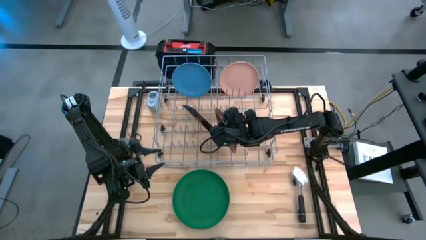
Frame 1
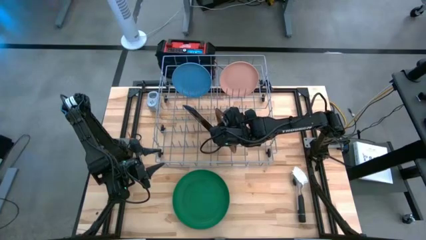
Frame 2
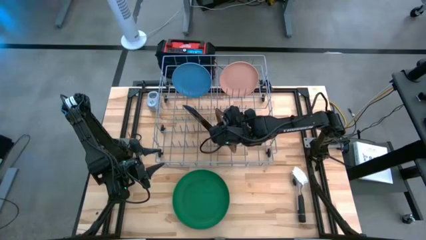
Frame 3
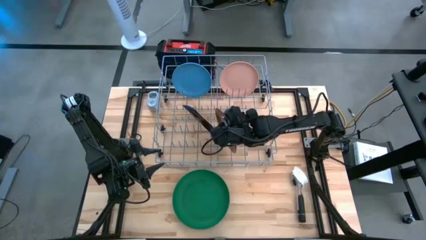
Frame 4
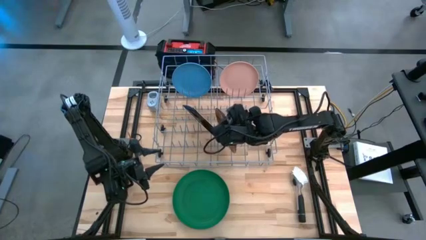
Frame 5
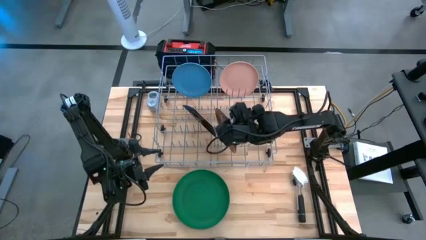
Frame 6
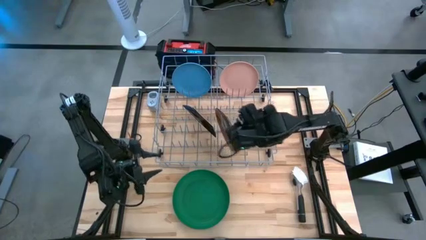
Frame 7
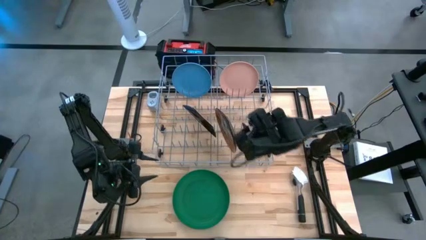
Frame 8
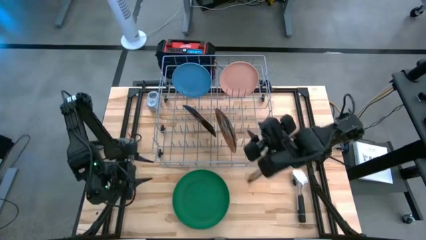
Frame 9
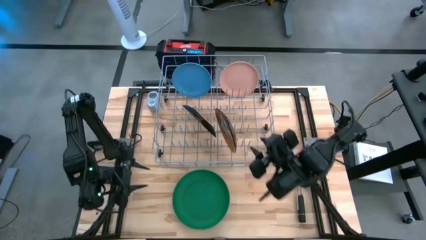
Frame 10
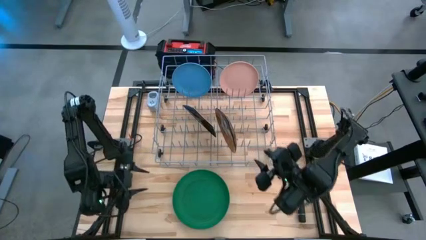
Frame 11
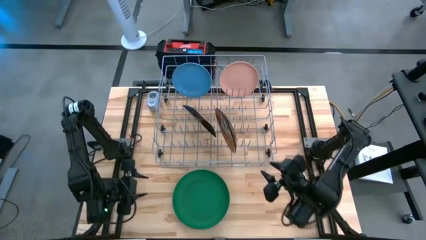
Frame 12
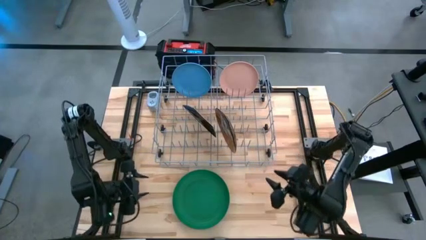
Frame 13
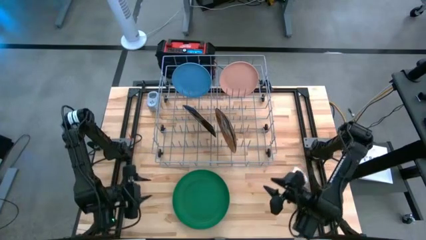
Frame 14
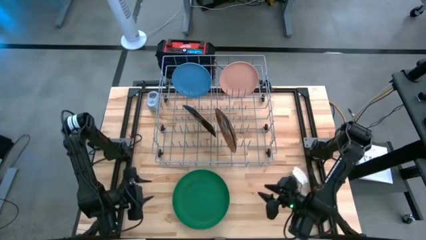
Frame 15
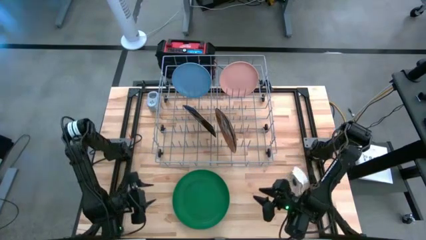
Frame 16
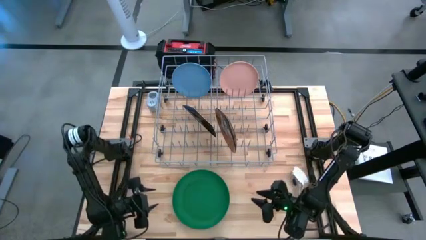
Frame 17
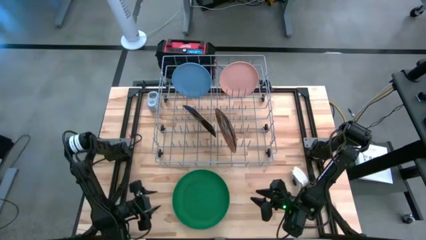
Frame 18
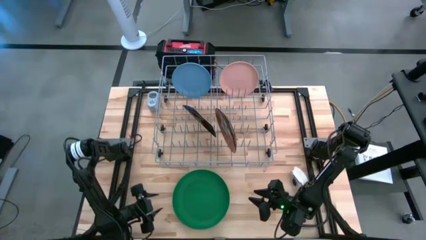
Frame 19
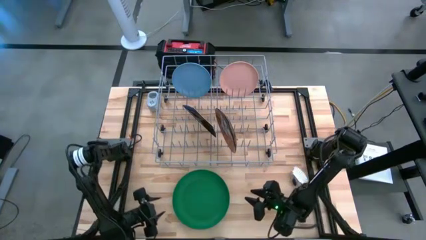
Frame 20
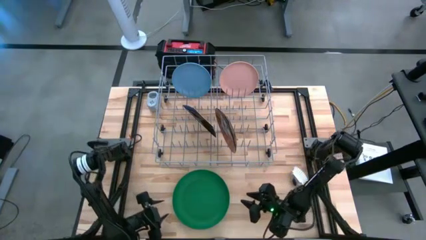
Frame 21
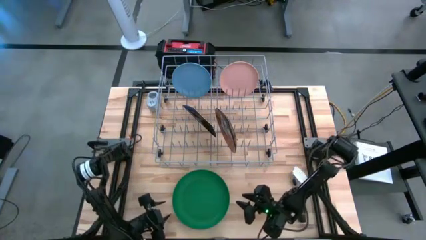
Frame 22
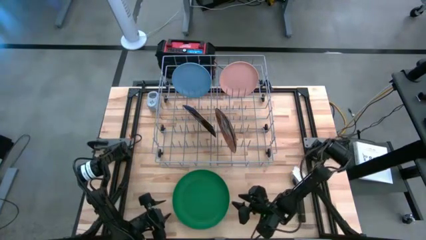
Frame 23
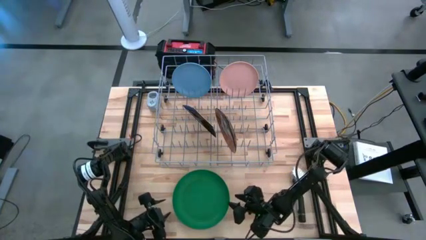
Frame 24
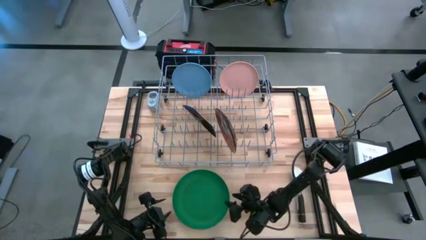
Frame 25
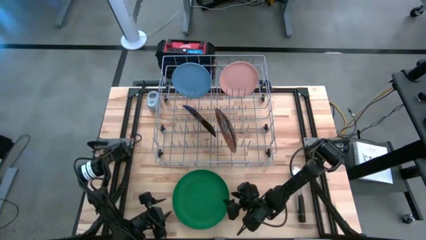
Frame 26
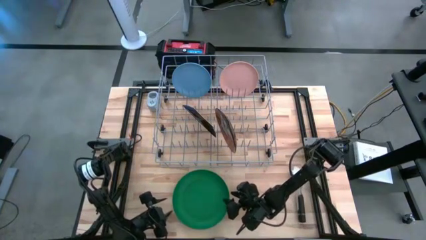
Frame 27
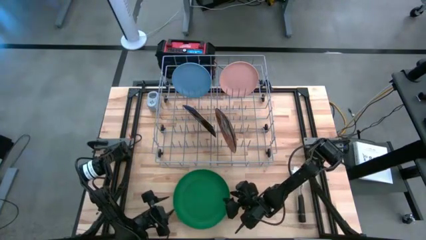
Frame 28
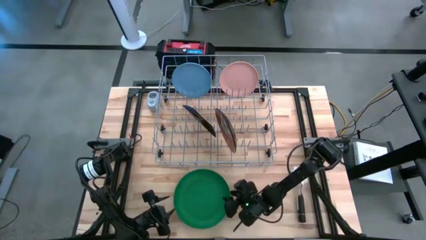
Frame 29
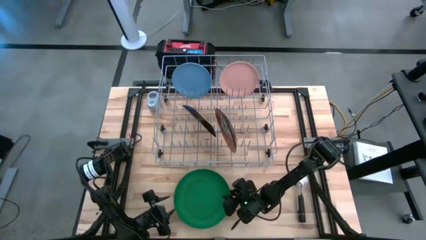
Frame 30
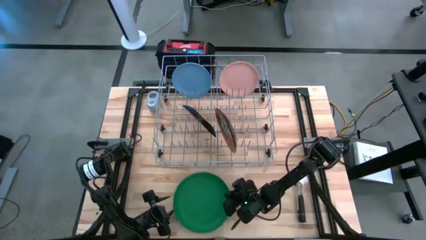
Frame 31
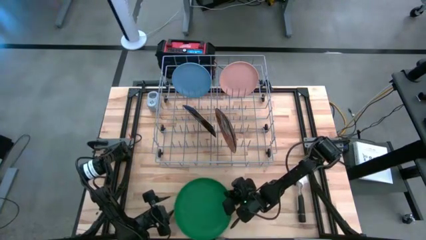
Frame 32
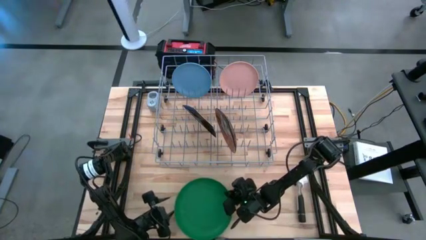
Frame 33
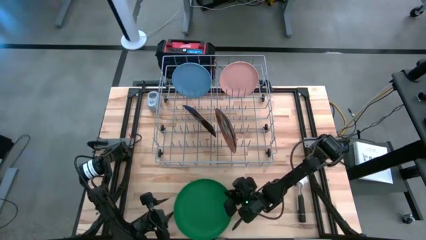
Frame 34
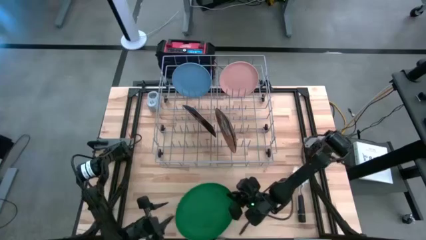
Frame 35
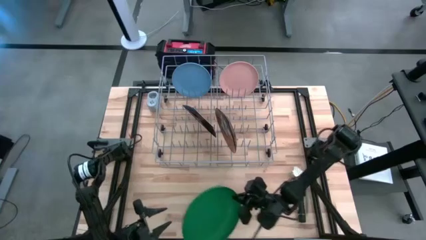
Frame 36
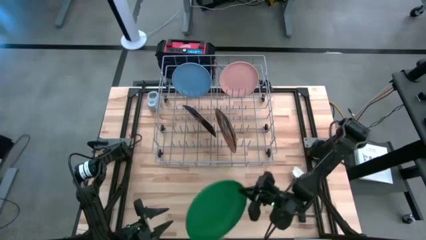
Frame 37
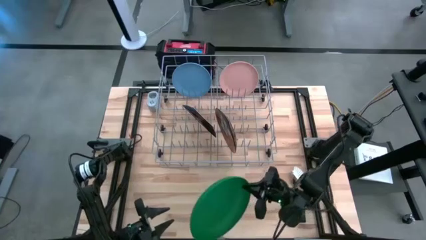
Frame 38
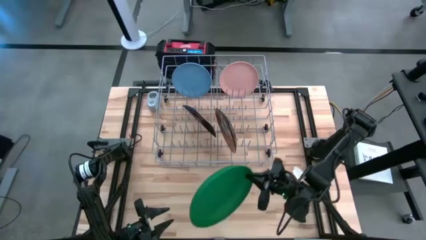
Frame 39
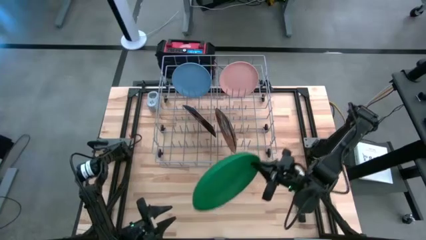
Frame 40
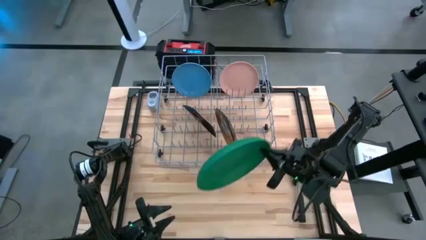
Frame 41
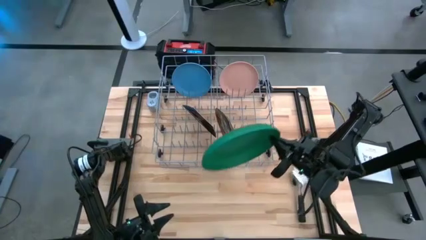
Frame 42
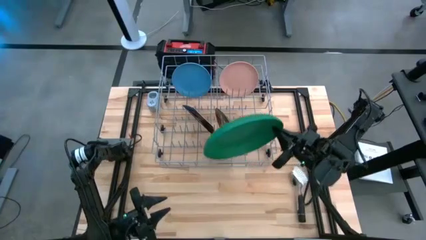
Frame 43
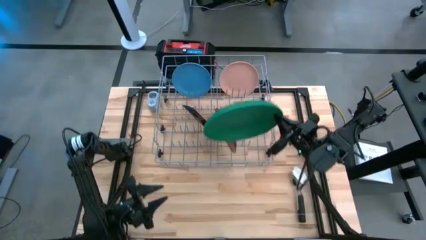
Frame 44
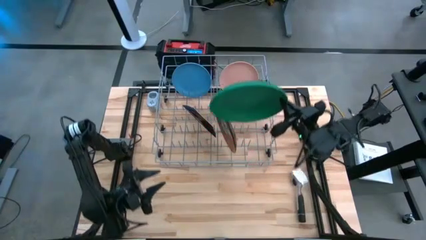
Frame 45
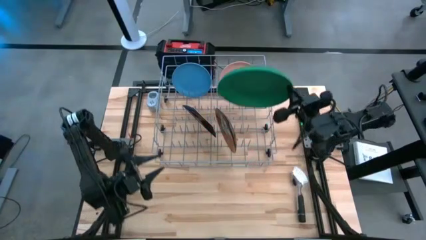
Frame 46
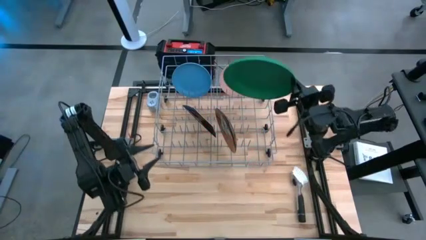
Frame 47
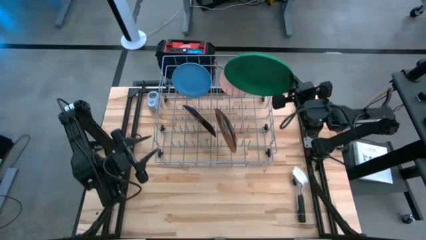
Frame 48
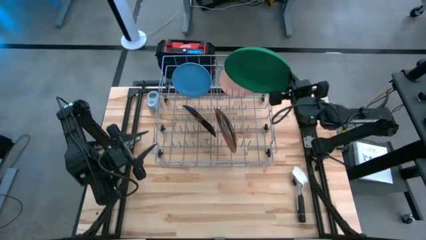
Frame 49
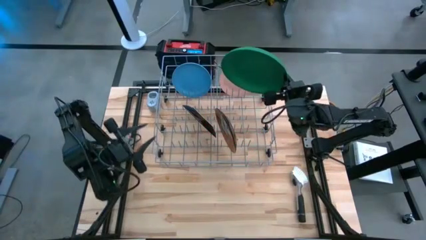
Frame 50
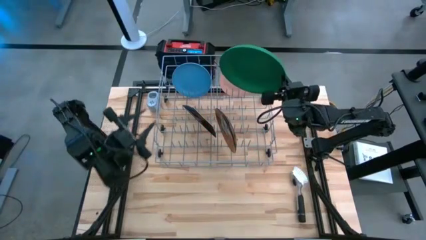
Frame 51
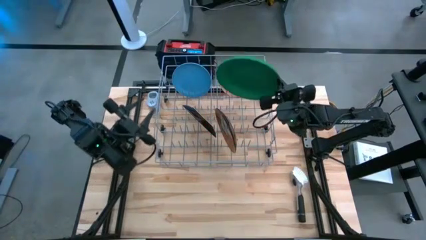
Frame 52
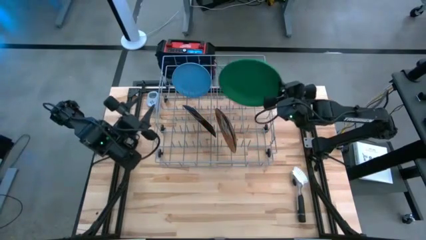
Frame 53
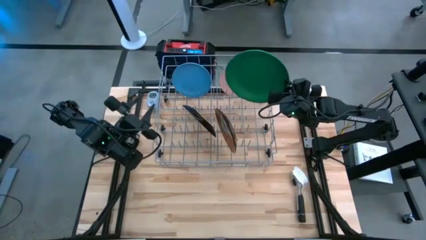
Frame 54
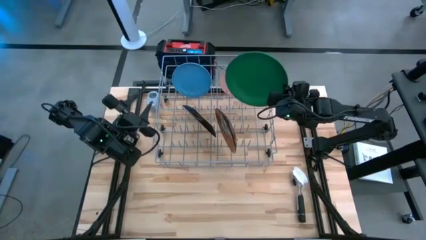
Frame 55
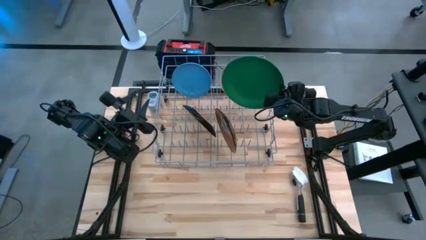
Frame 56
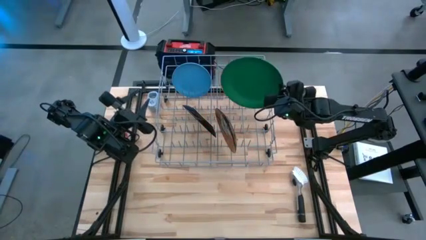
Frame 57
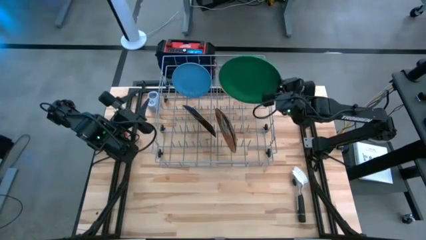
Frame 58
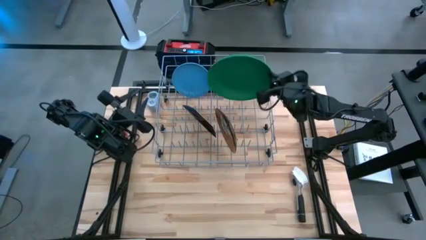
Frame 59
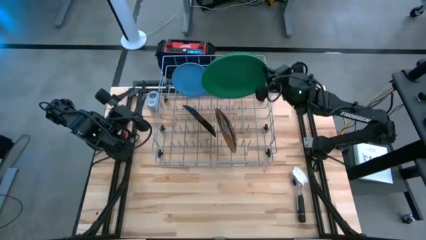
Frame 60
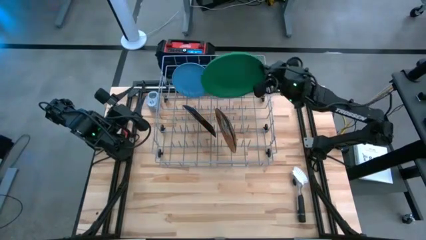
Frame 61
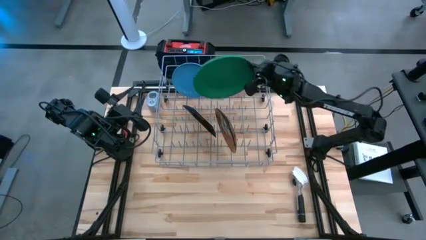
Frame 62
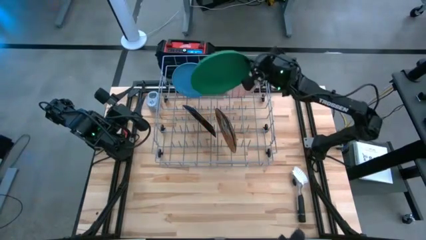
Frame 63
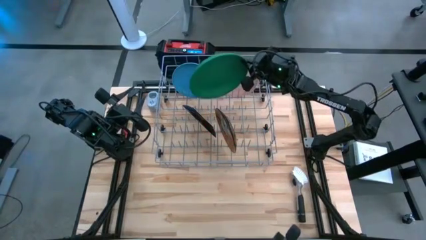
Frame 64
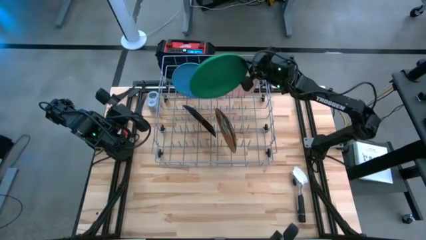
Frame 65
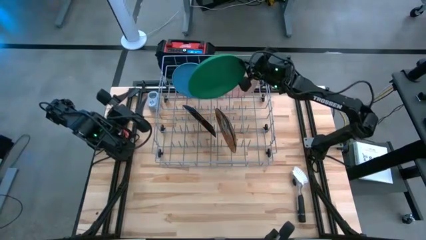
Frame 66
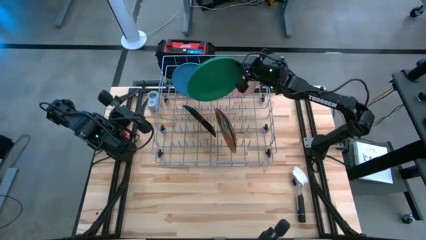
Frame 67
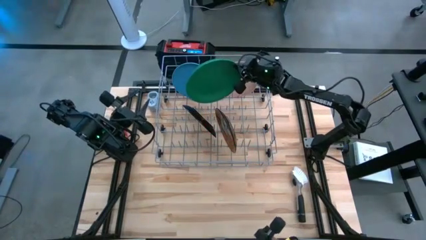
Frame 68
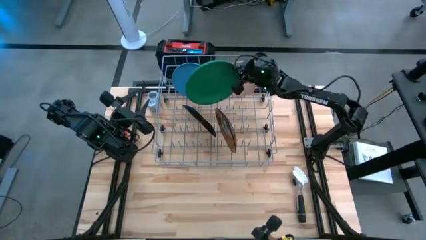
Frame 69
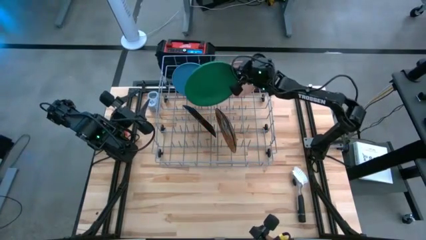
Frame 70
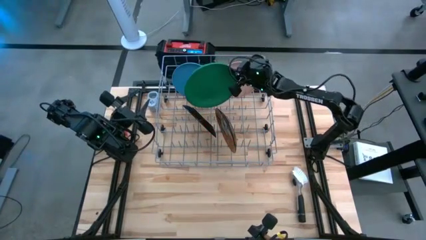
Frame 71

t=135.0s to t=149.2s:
Task: Sort dishes
Put the green plate into the dish rack

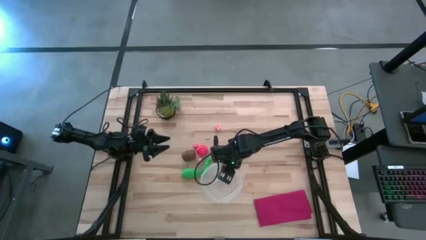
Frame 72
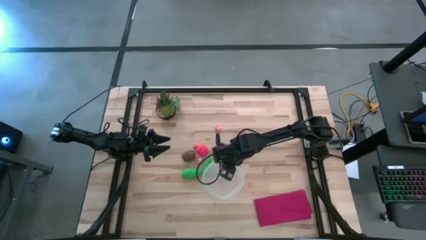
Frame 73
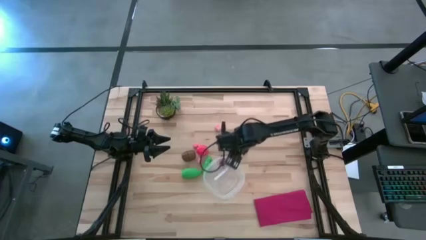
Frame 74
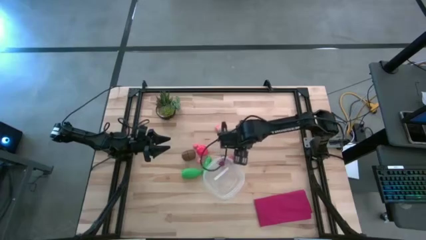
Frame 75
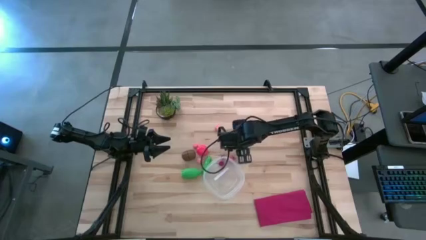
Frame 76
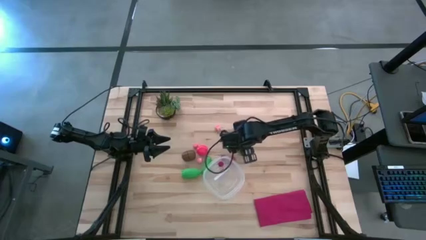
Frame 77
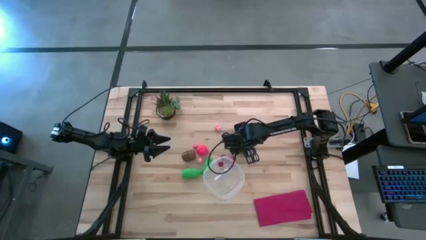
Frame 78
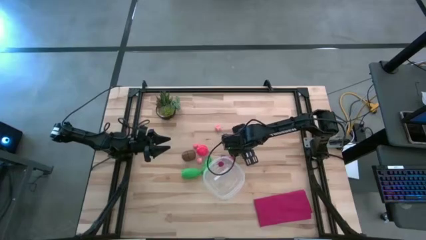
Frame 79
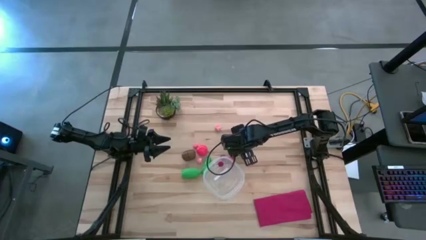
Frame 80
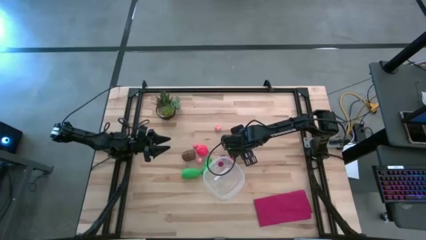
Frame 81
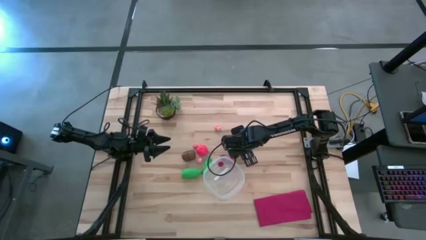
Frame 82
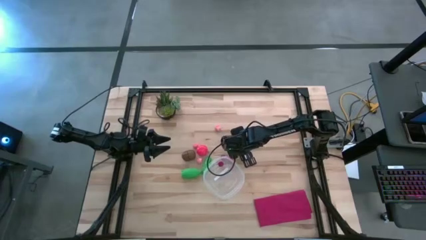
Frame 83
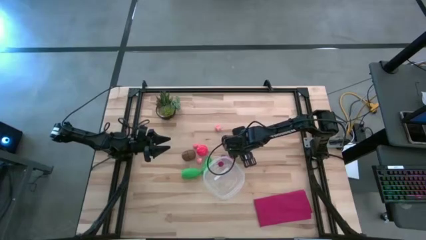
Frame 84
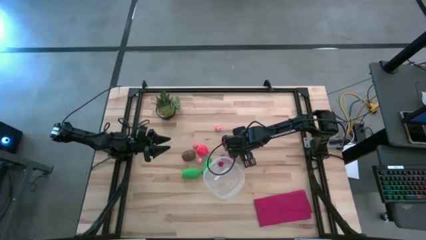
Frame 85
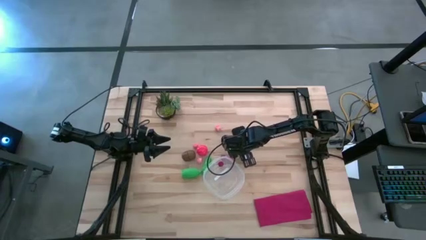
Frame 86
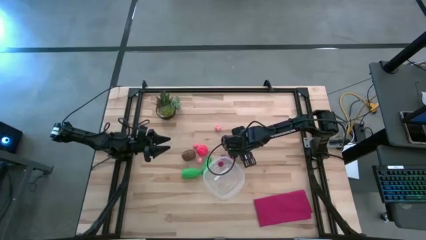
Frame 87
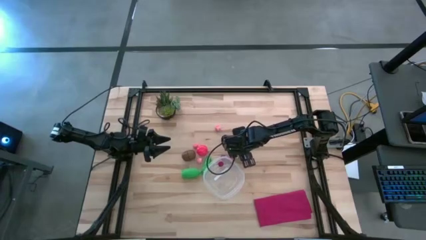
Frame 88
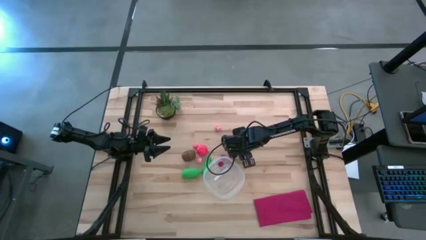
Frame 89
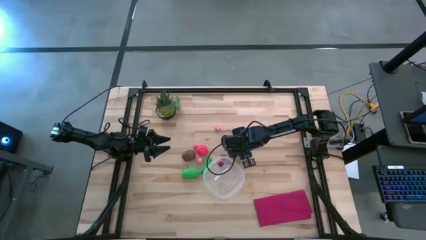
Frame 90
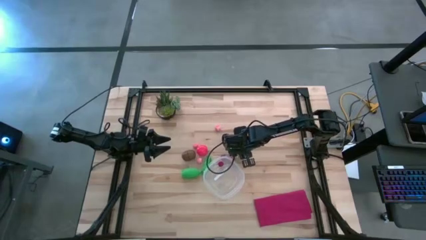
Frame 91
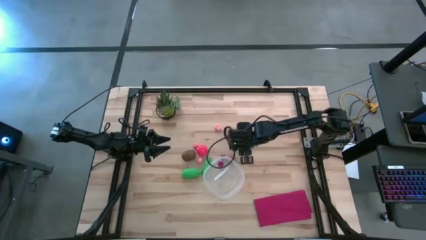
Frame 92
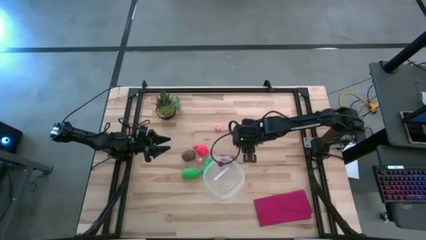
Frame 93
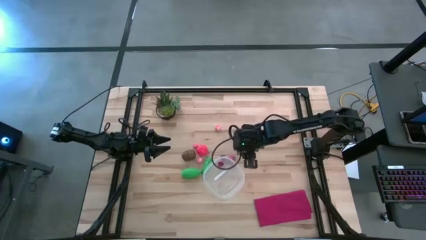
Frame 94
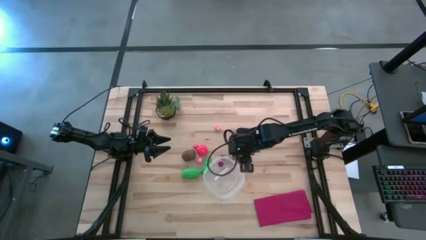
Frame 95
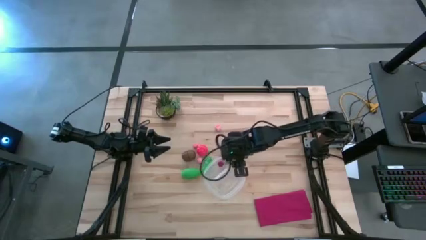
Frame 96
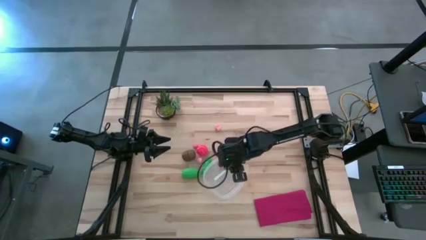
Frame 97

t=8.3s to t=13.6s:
Task: Pick and placing Produce into tupperware
Put the right red strawberry into the transparent bin
